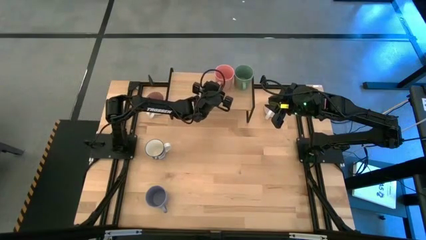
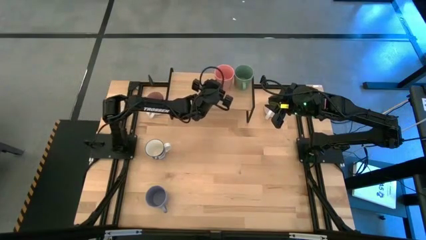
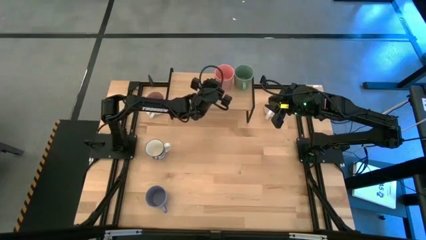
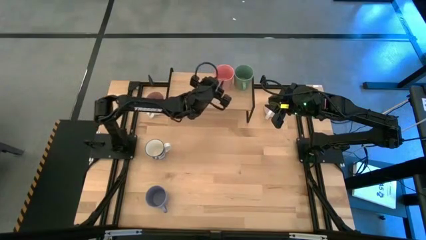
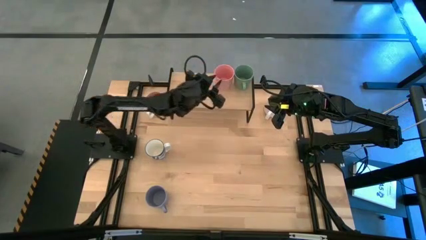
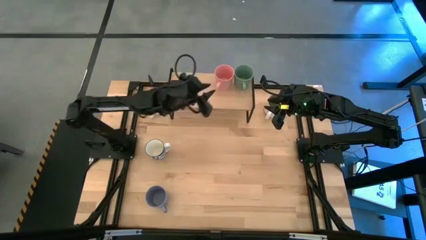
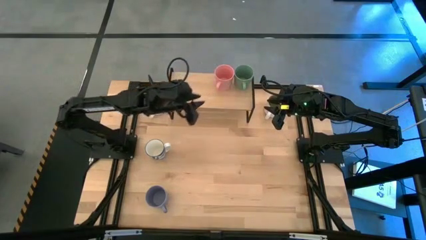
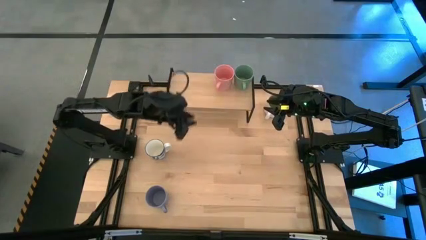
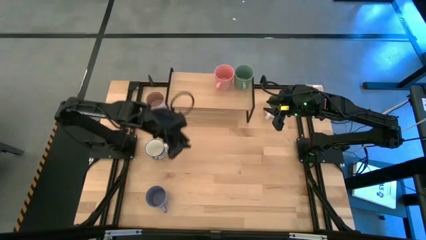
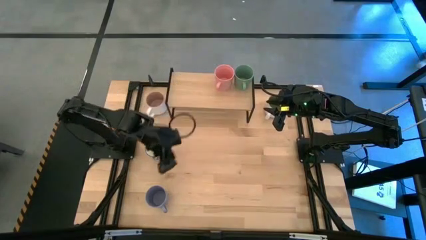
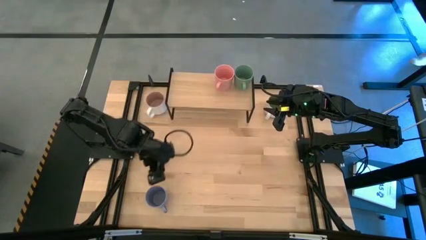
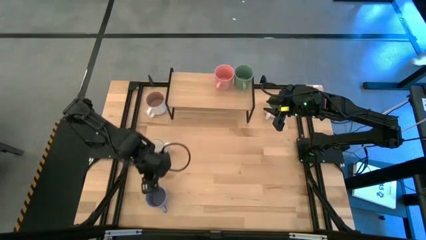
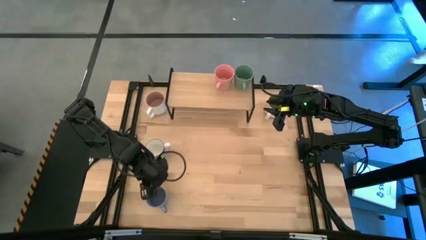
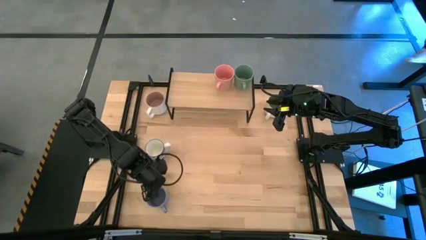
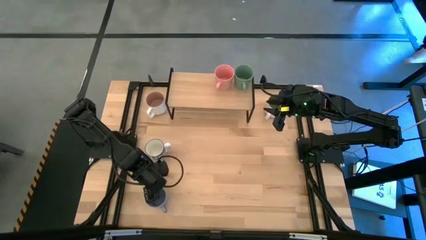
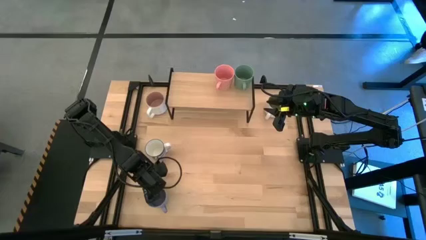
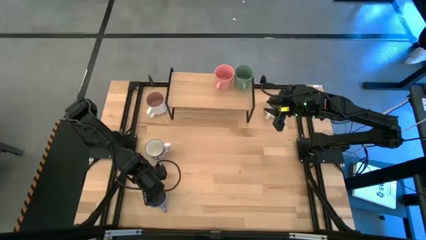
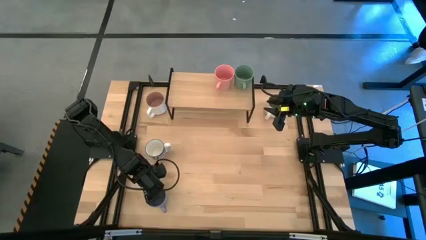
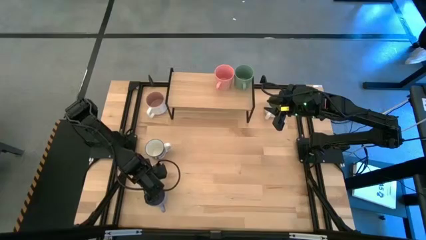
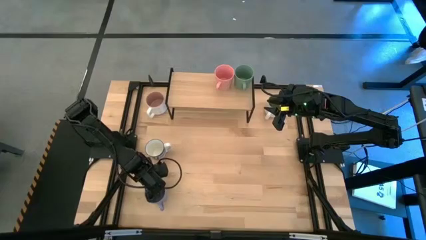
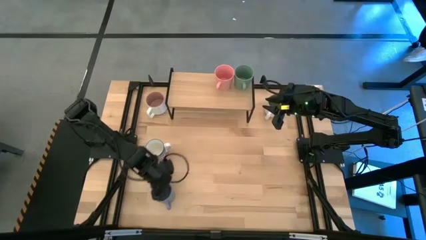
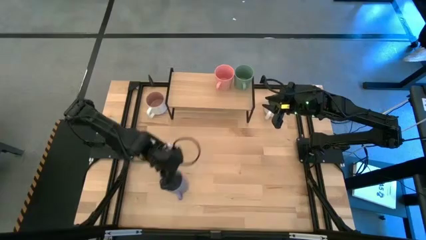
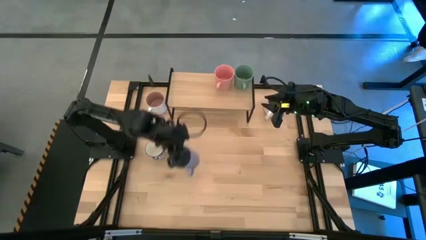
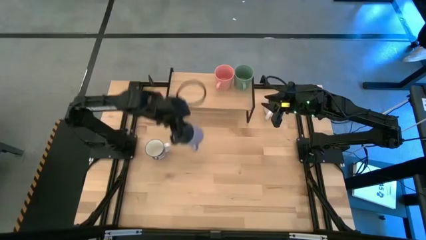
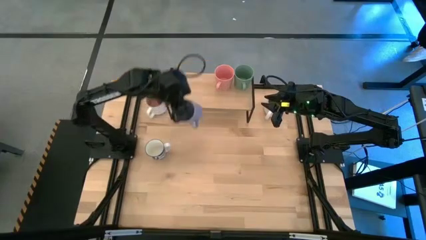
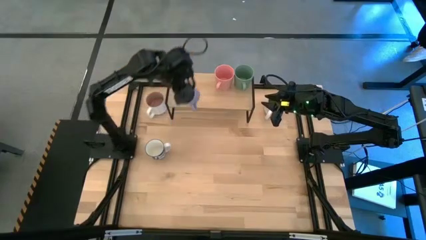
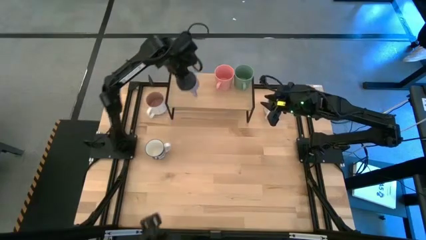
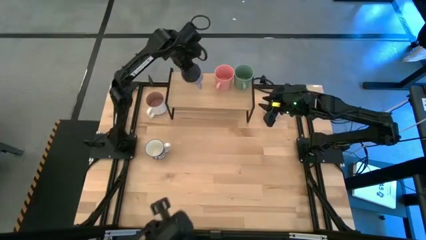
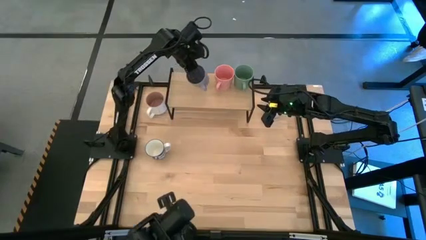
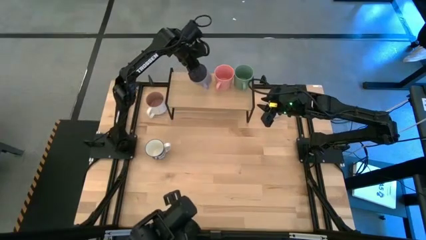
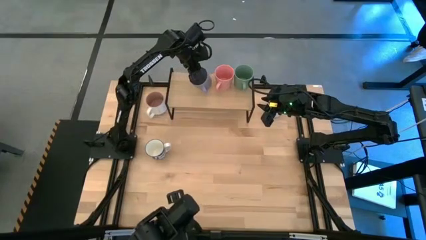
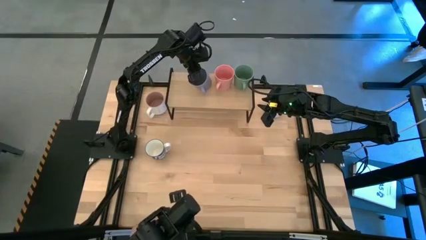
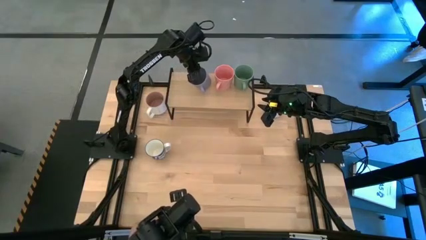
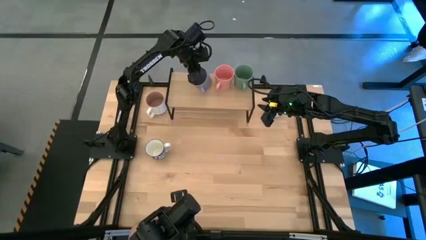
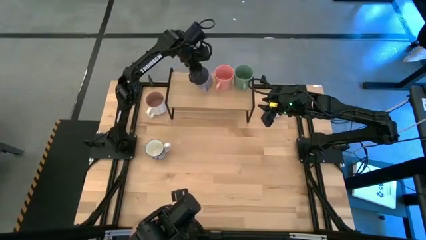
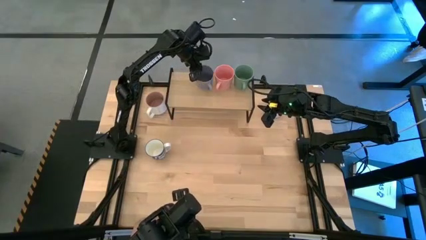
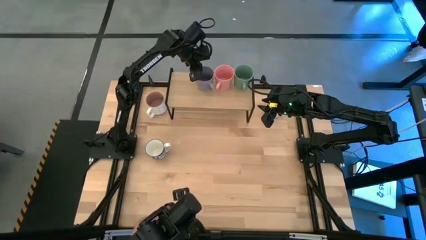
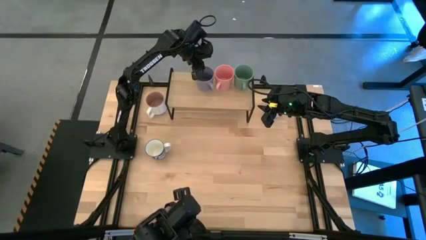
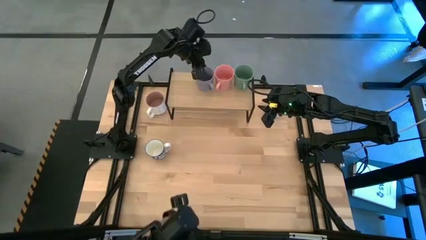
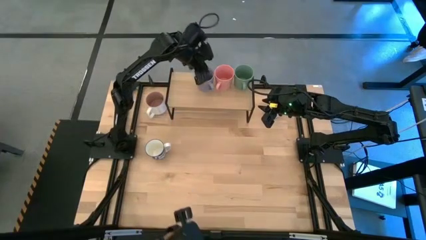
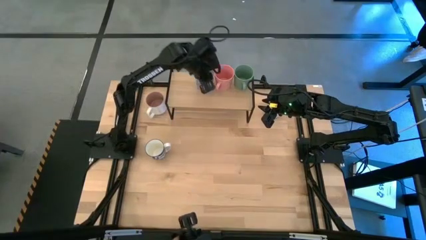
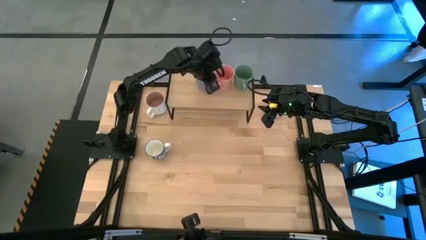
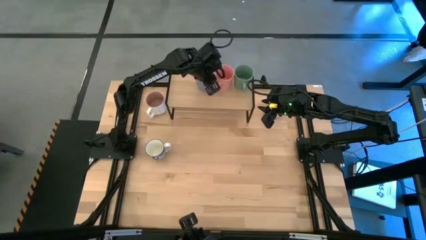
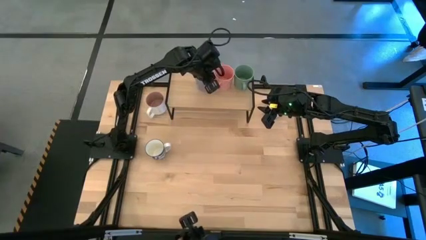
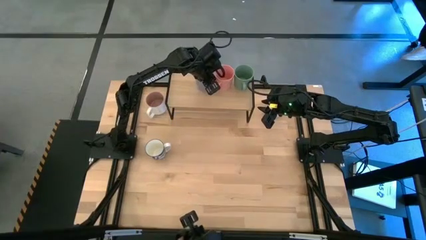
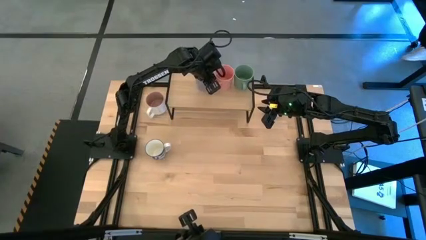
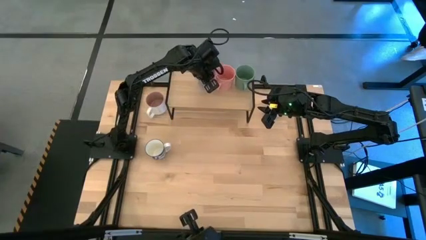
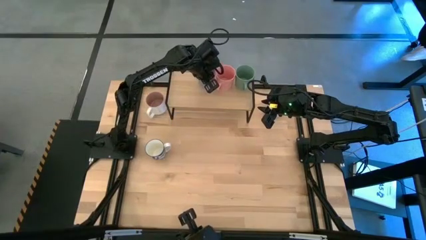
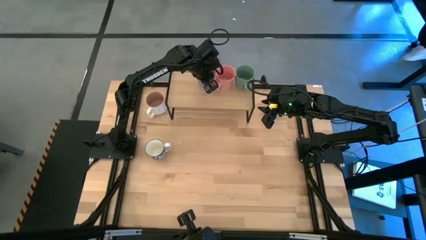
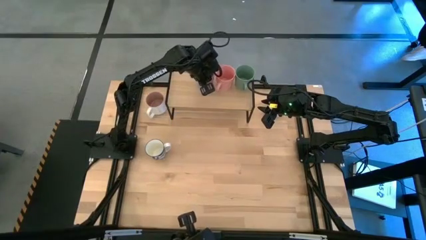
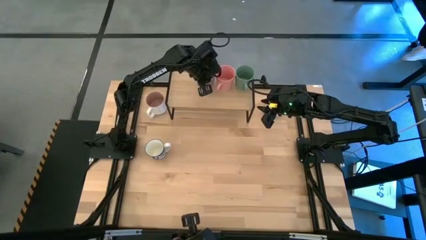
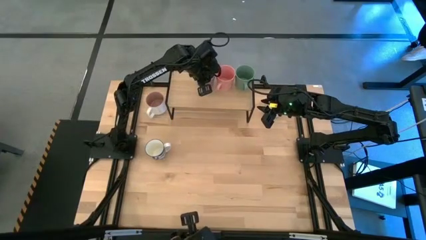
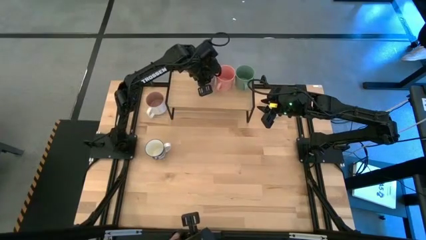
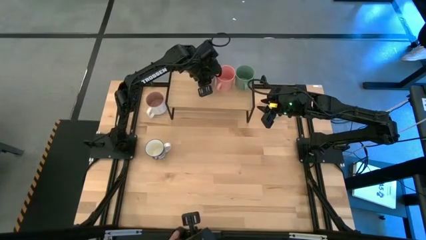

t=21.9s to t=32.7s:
Task: Place coffee mugs
Put the purple mug on the shelf

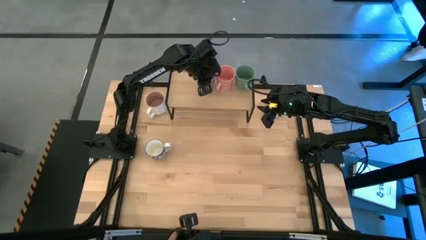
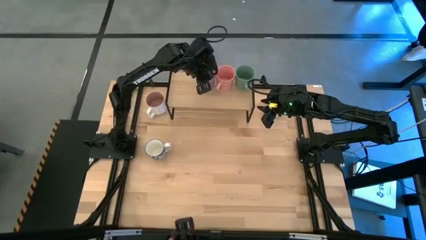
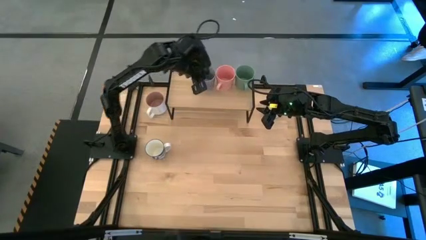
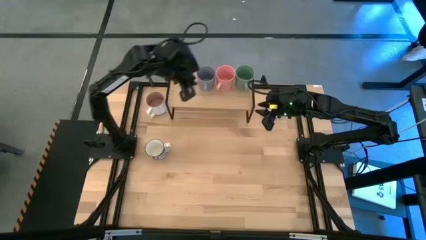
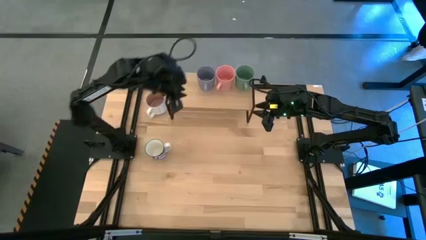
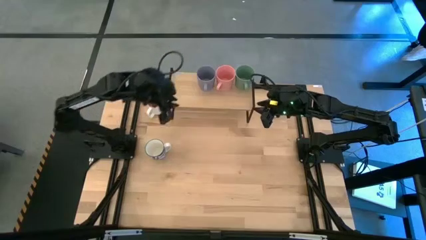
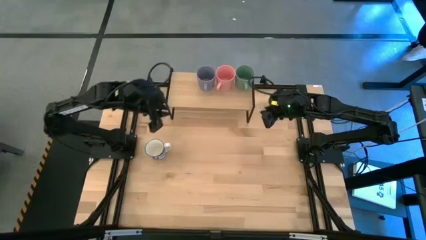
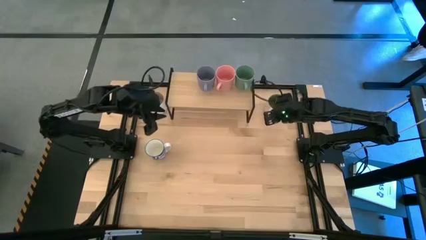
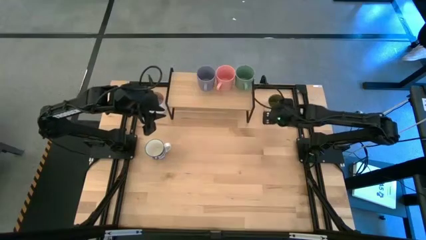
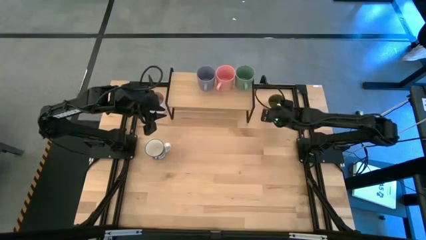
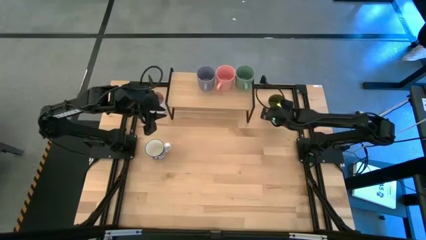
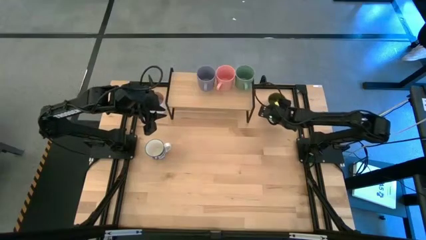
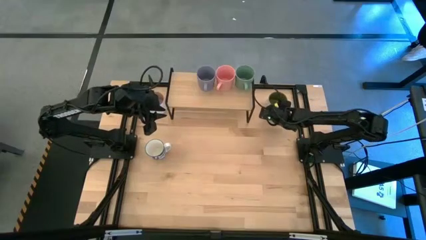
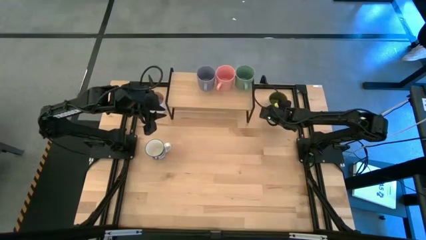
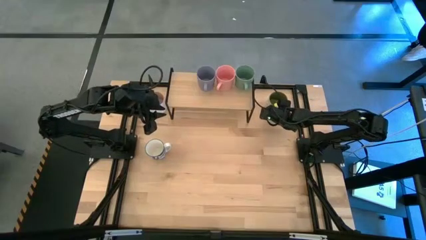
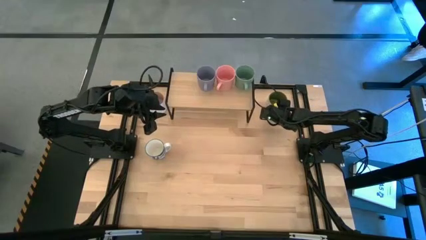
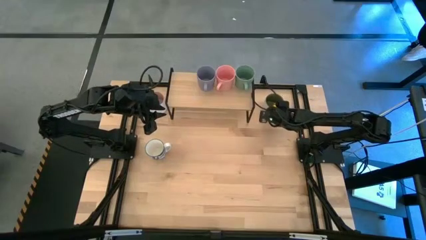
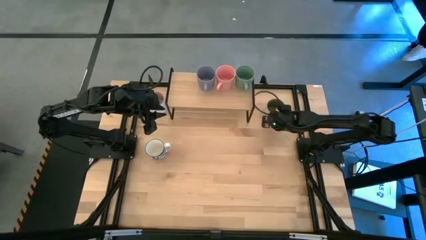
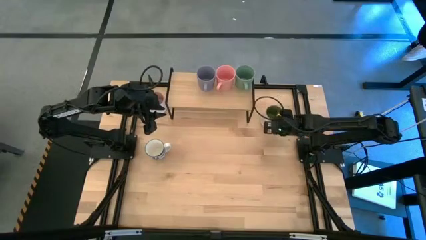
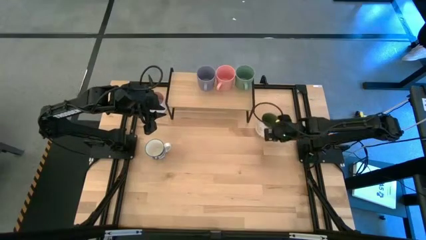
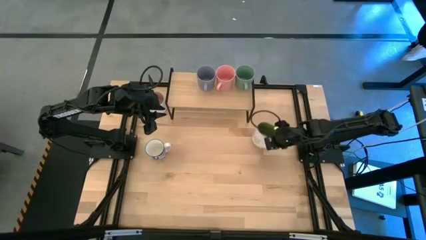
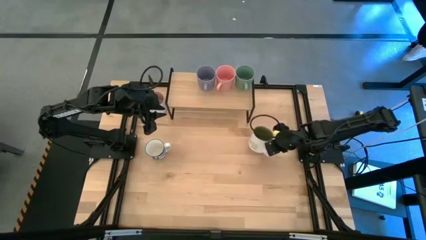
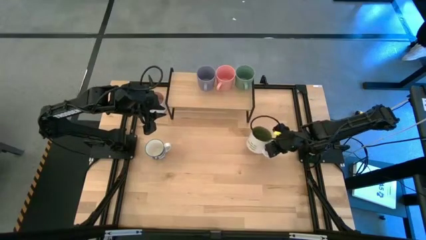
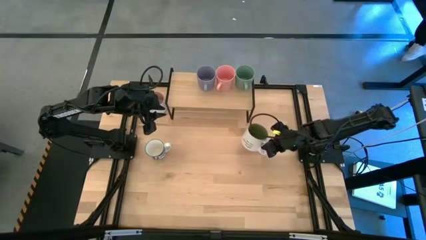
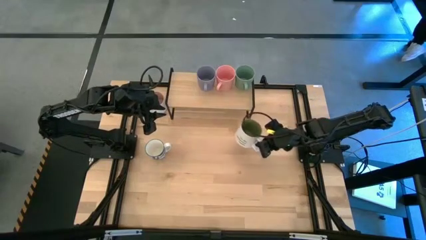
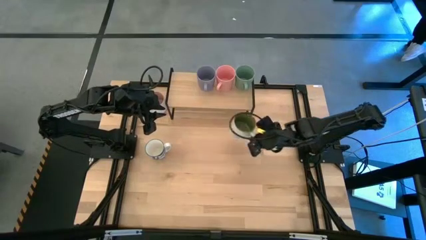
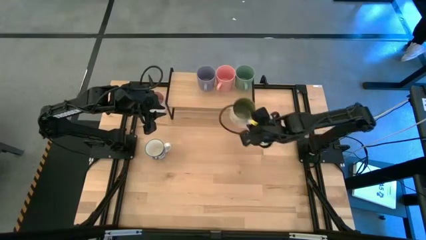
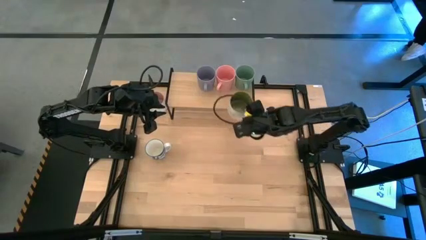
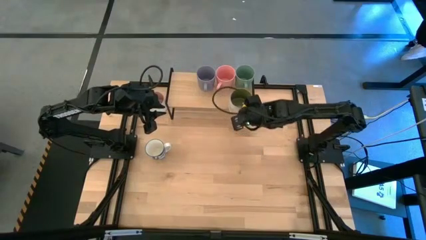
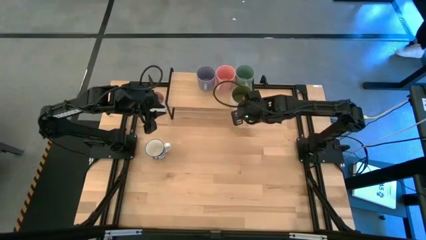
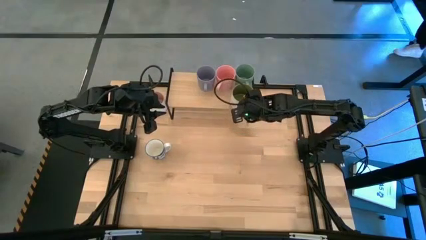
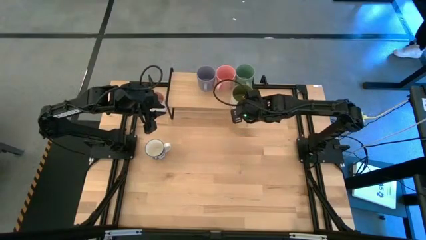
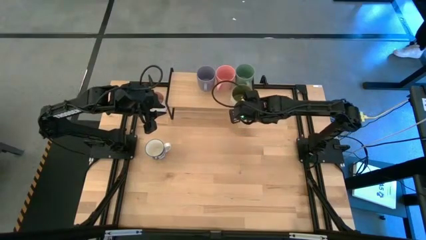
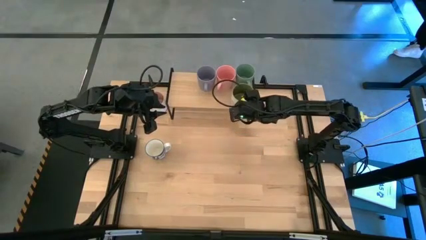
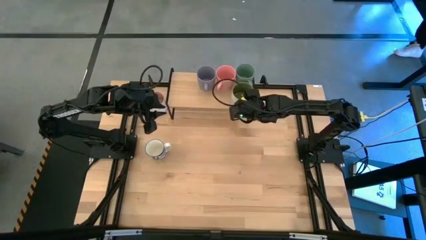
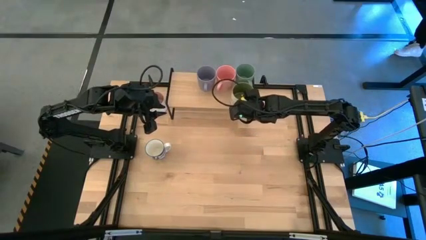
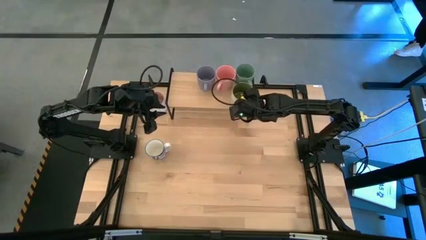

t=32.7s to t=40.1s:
Put the white and green mug on the shelf
